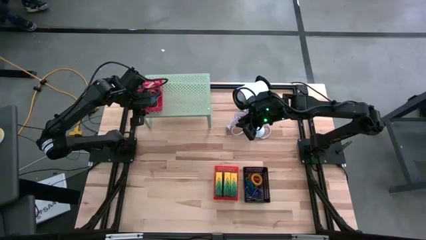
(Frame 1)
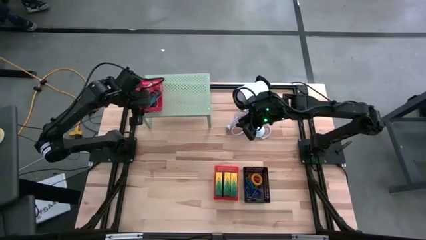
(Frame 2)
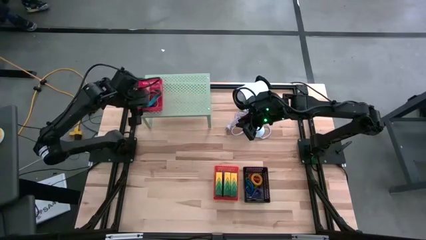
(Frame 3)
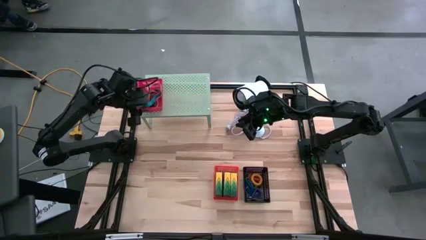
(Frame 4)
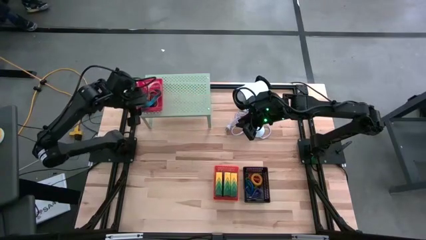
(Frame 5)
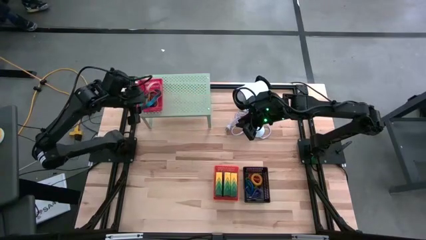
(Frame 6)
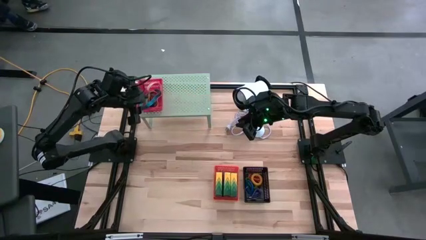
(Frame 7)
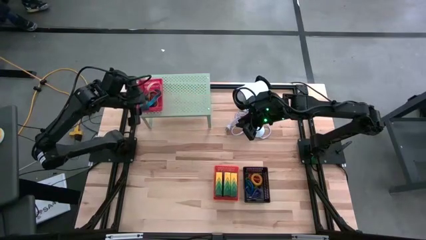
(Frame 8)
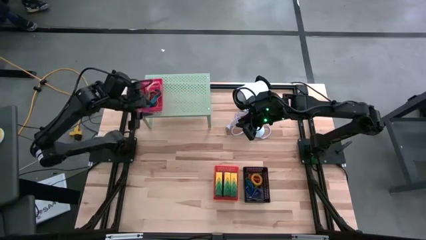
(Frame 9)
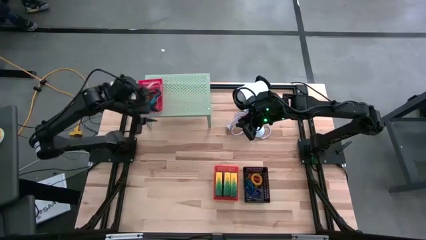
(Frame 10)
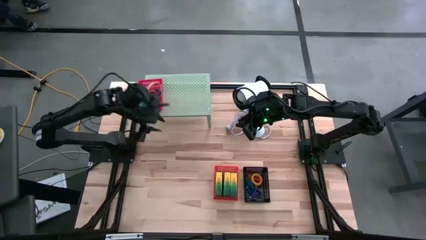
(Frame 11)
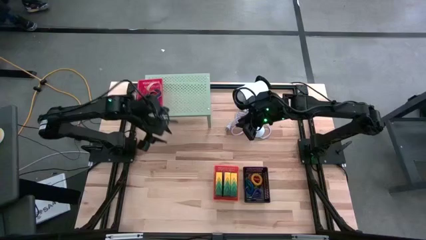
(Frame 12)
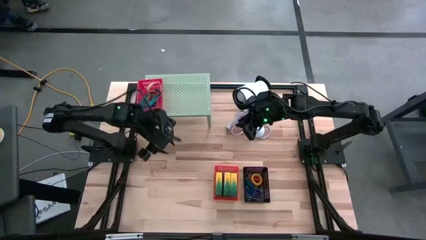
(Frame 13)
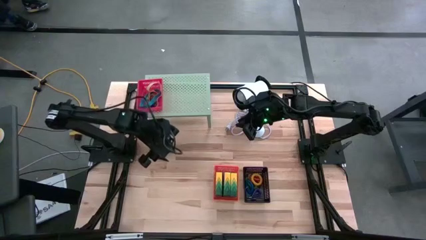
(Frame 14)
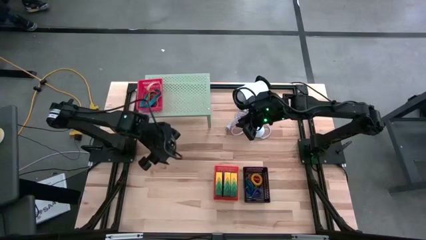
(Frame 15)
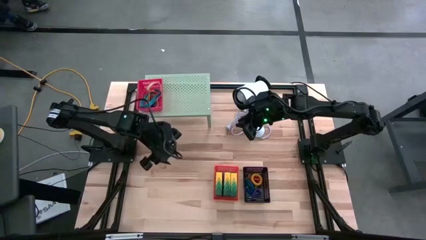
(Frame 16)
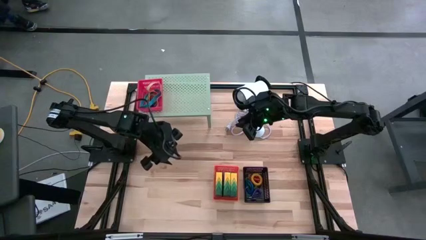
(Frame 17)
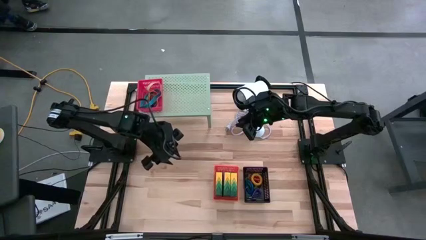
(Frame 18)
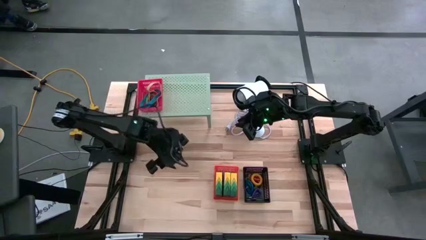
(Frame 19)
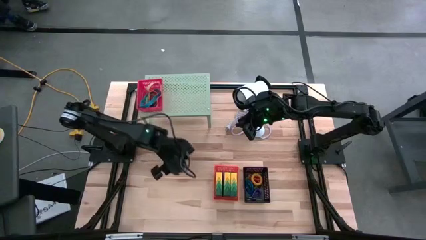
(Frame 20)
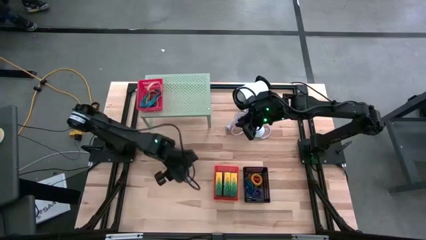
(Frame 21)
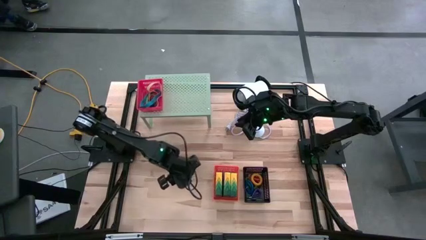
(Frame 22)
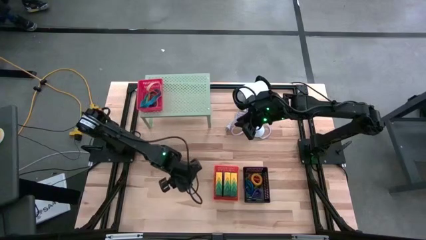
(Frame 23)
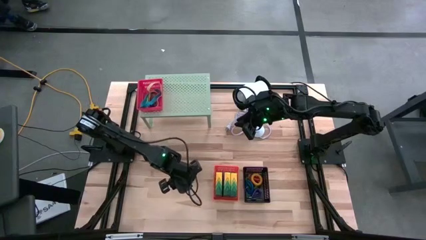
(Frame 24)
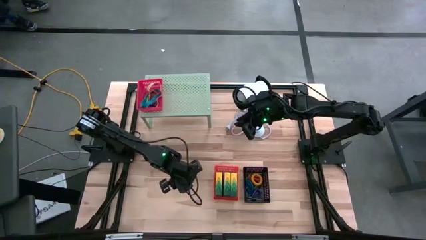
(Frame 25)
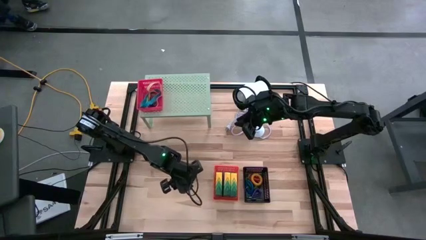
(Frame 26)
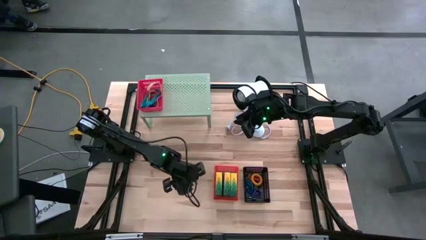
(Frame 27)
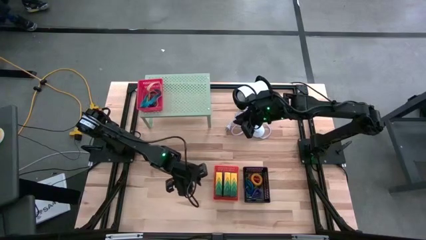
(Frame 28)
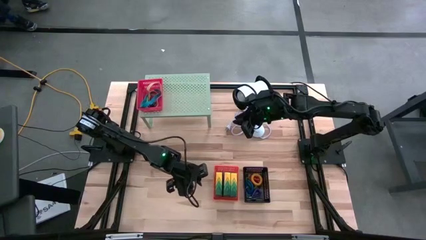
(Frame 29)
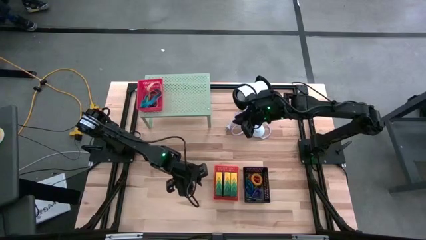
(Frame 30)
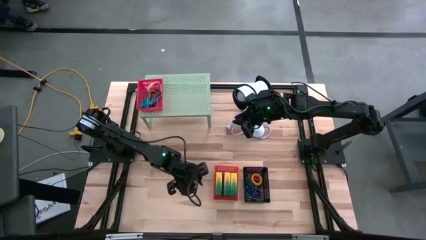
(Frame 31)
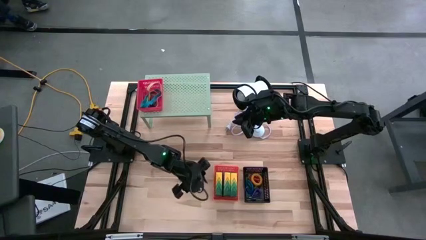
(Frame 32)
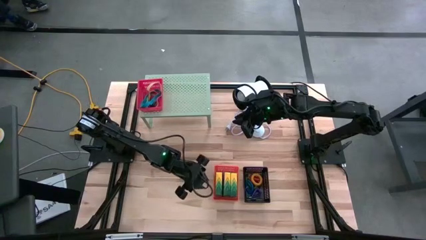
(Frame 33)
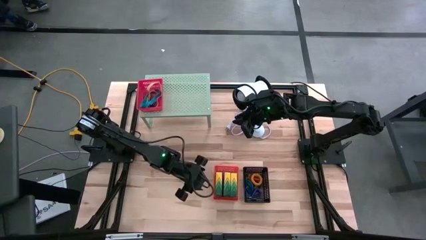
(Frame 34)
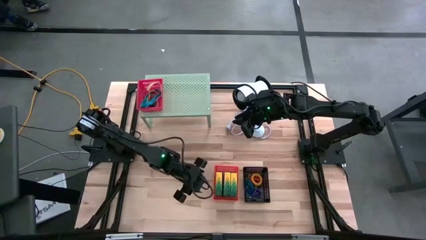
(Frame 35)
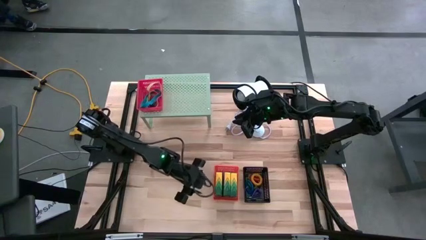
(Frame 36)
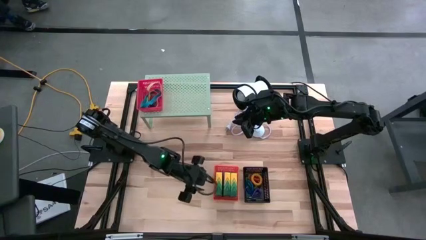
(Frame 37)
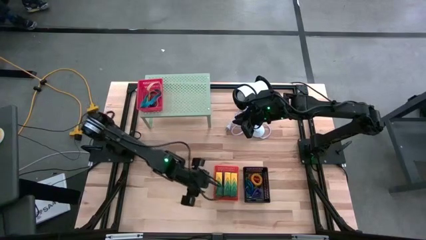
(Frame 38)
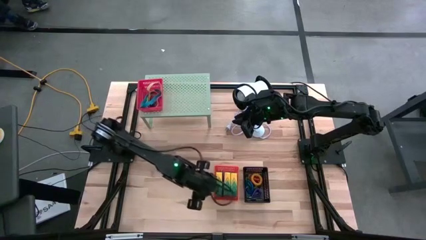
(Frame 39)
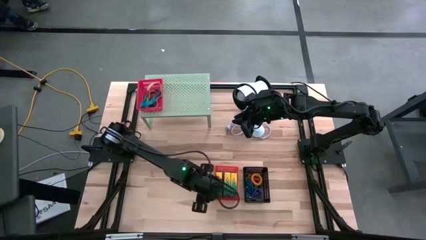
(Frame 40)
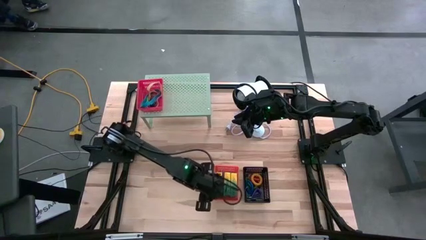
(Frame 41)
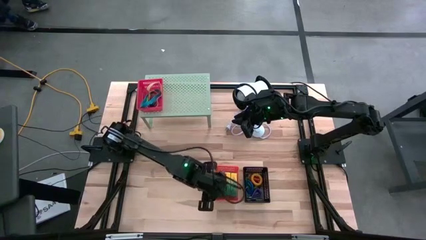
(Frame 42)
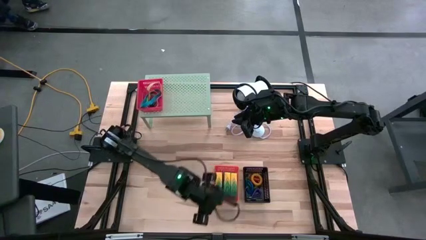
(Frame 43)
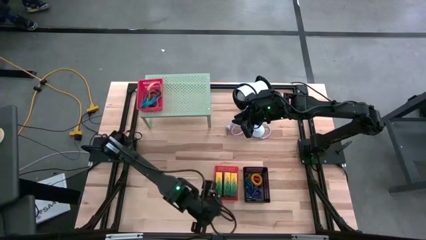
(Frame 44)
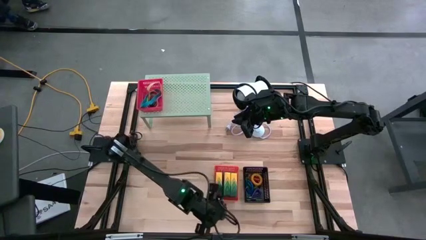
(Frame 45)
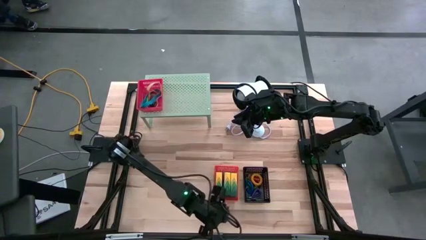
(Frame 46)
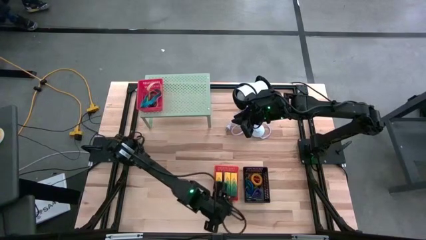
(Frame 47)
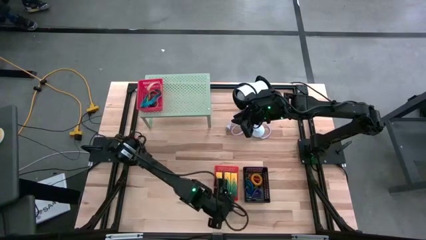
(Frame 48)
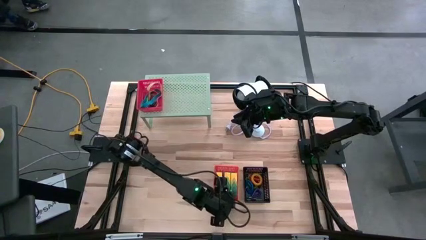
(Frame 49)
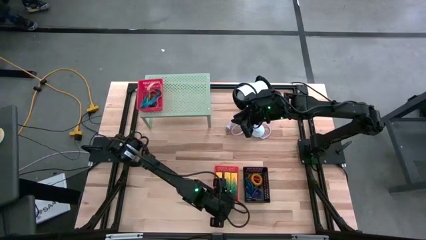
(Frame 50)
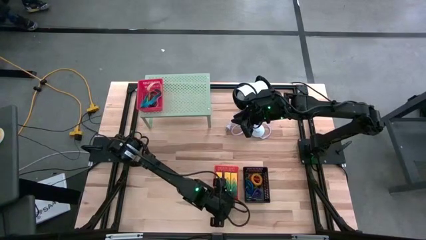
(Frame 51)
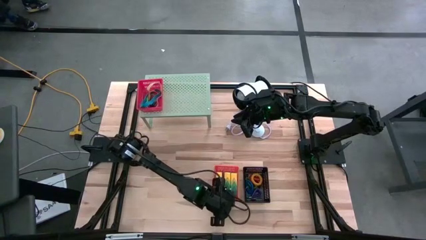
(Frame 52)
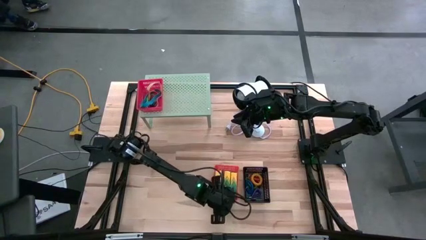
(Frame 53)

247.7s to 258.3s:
Task: Pick & Place Office Desk Supplies
Put the orange basket on the shelf

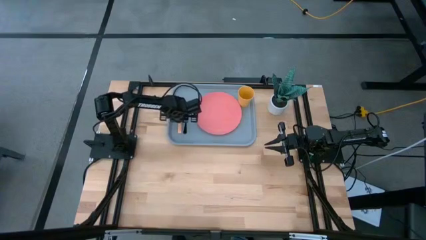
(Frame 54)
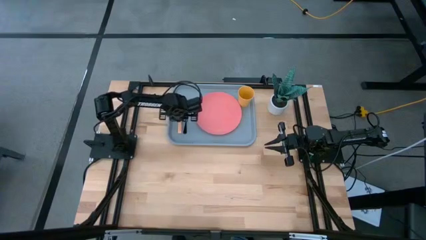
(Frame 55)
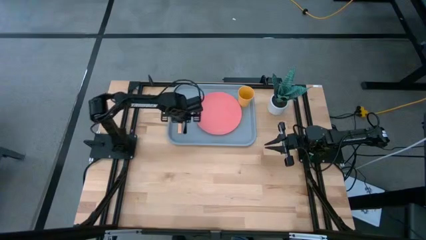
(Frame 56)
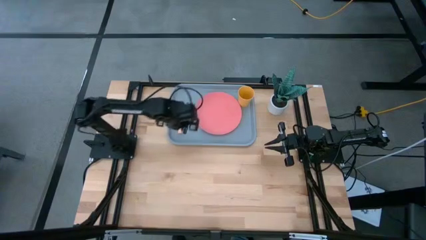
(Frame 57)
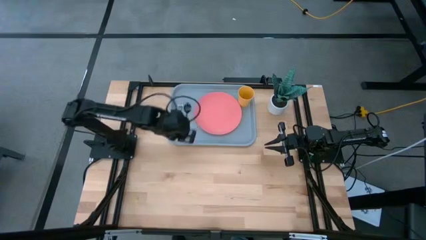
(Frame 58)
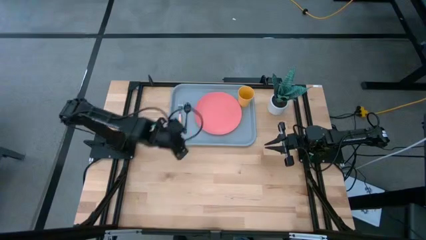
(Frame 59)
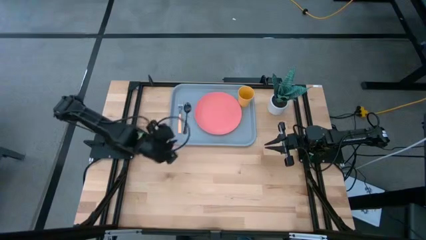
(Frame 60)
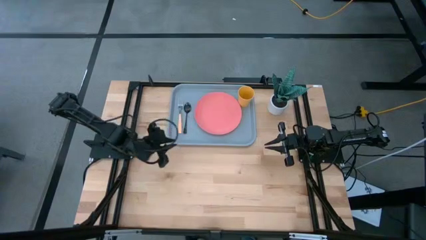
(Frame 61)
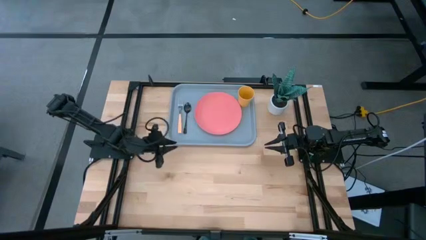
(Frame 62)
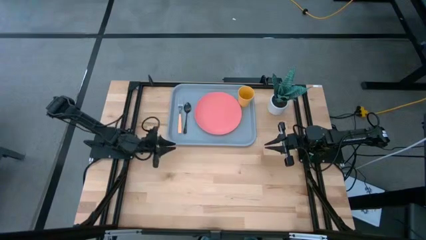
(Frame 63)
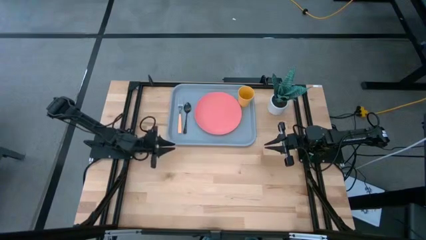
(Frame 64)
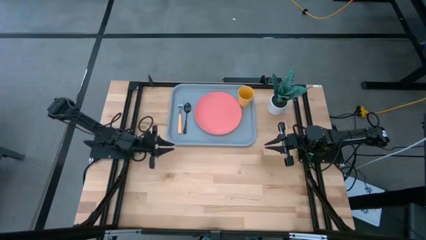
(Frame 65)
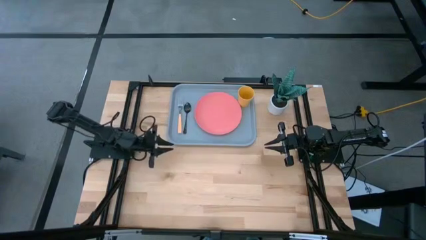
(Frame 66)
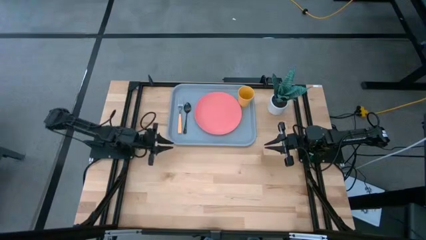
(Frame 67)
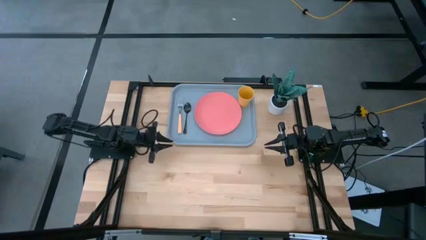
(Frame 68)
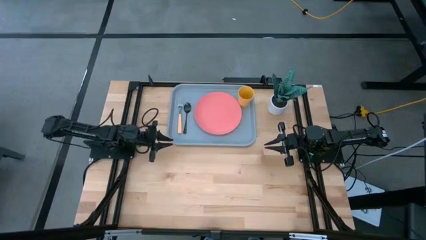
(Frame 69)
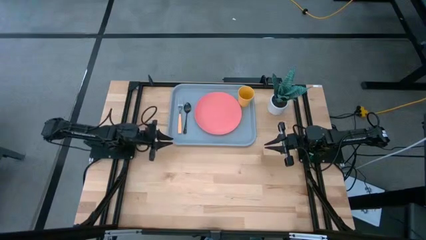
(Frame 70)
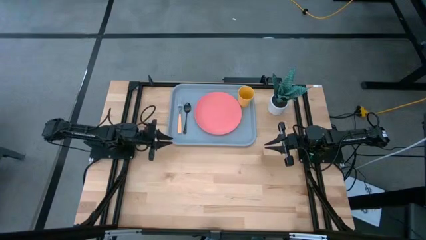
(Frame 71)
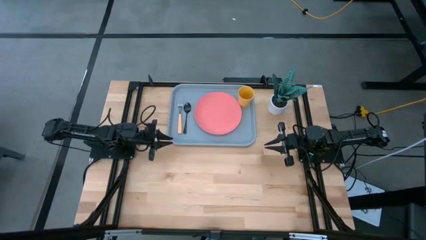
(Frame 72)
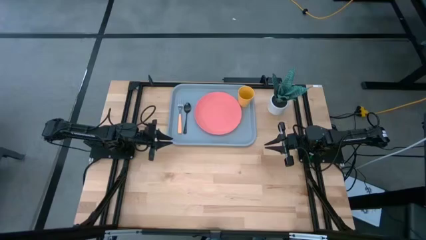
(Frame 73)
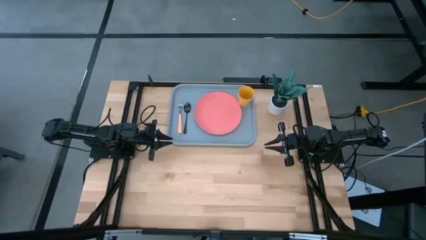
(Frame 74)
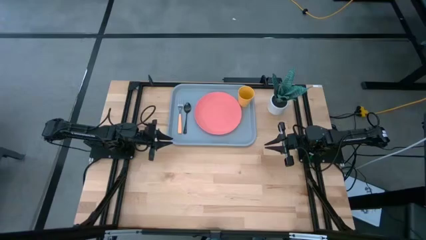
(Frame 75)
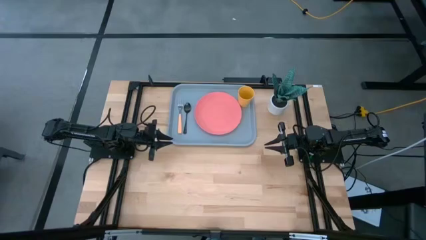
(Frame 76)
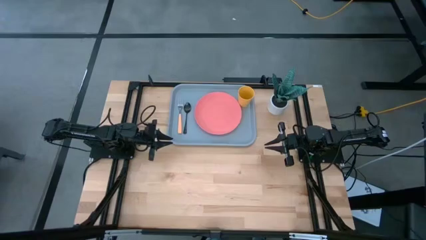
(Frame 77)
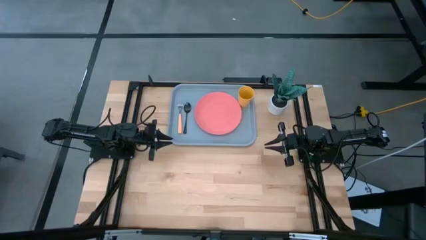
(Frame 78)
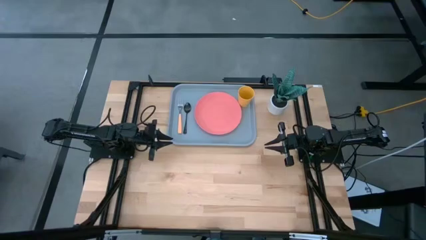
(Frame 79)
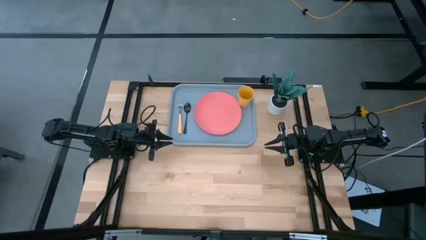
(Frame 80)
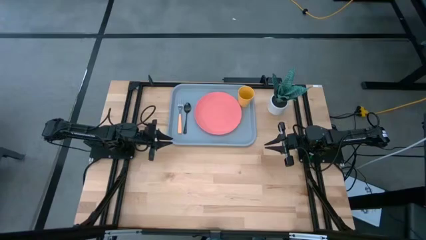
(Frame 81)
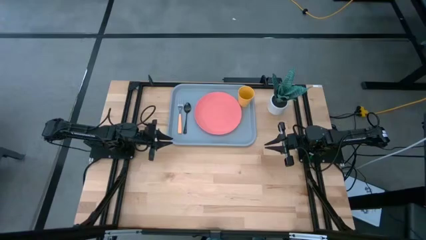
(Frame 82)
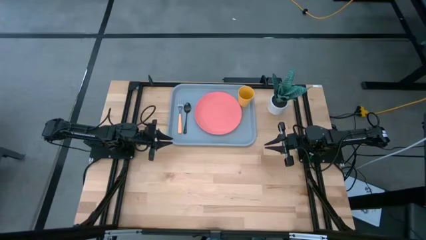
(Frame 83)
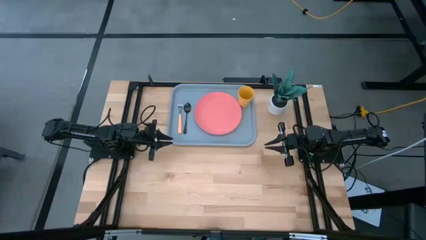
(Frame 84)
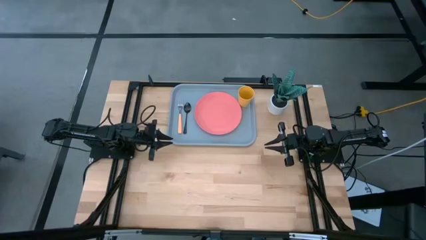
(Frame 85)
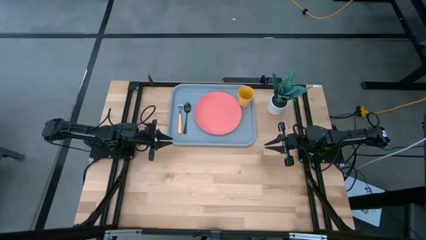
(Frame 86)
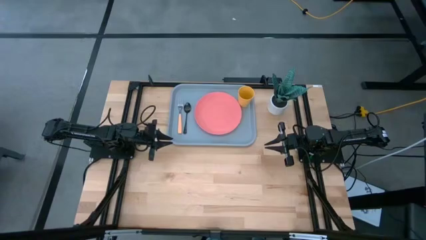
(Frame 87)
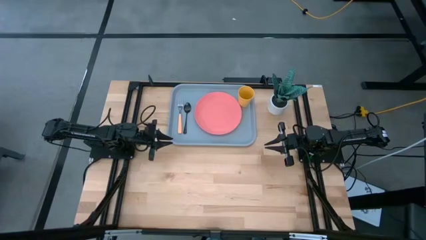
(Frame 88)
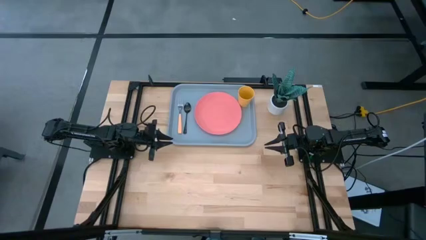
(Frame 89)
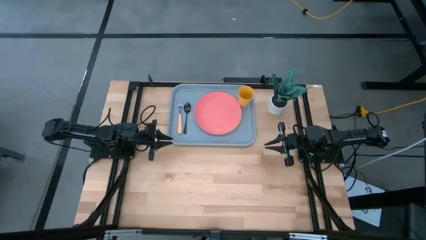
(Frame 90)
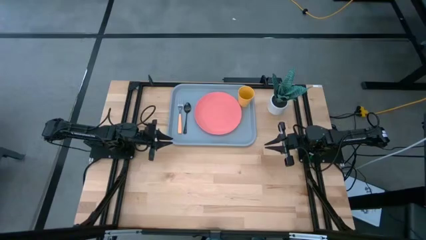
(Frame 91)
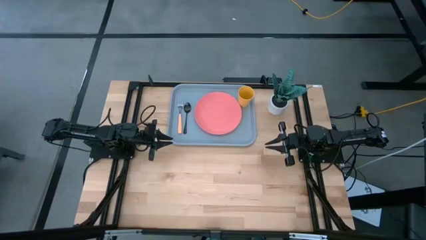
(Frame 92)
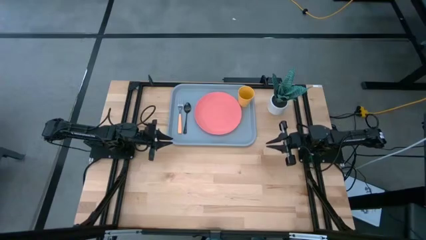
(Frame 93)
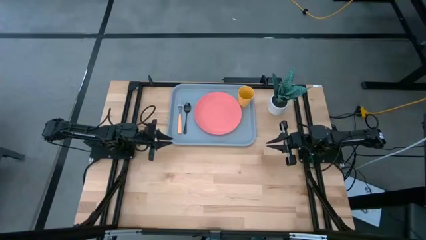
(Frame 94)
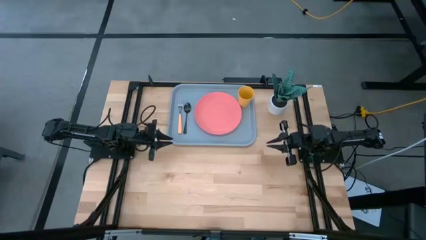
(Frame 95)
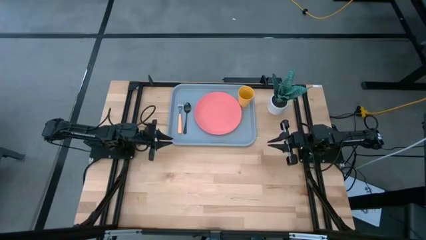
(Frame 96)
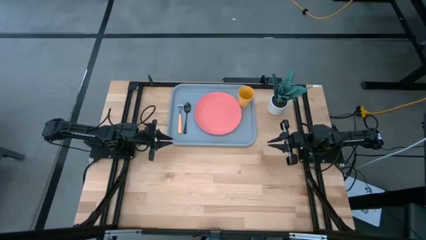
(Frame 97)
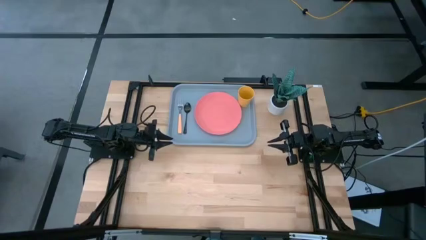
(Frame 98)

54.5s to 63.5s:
Task: Pick and place plate/cup/fork/spoon on tray
Return to Home Position
